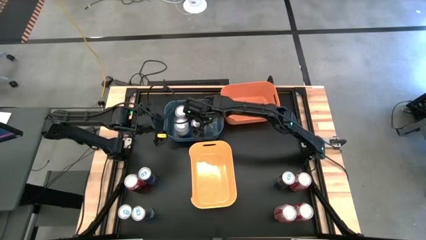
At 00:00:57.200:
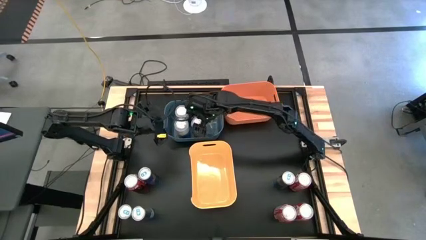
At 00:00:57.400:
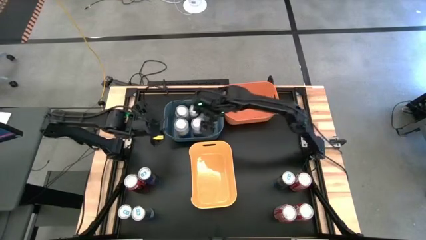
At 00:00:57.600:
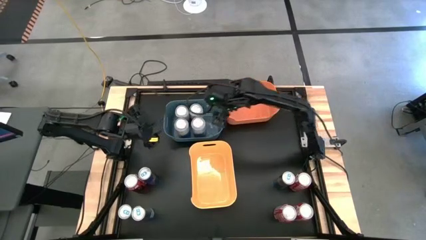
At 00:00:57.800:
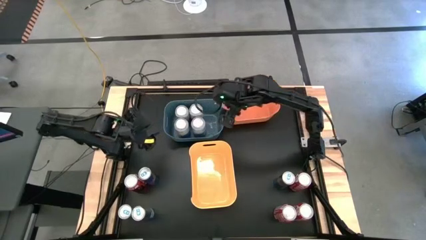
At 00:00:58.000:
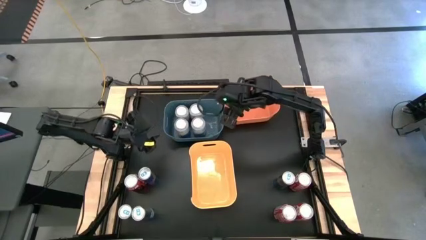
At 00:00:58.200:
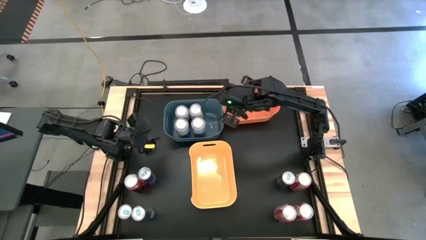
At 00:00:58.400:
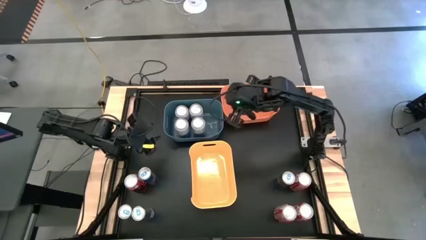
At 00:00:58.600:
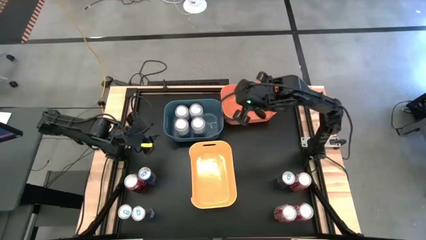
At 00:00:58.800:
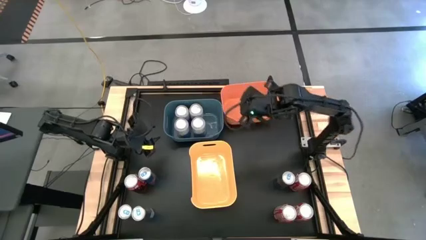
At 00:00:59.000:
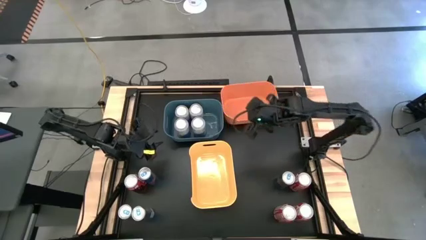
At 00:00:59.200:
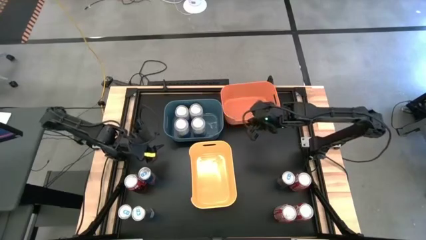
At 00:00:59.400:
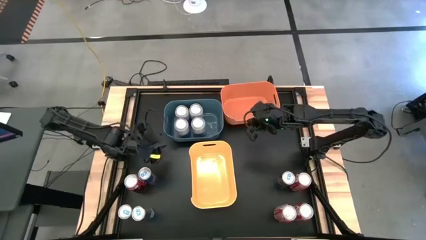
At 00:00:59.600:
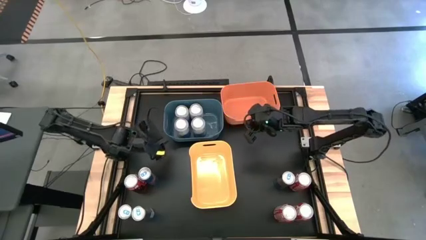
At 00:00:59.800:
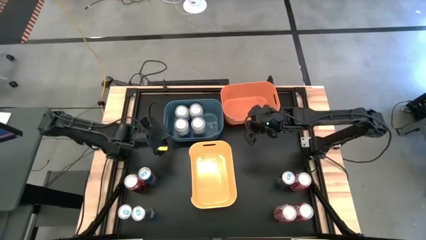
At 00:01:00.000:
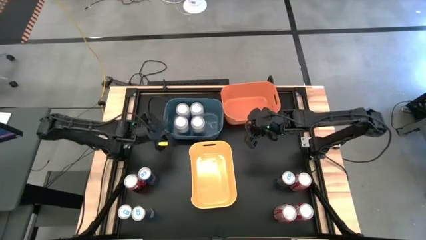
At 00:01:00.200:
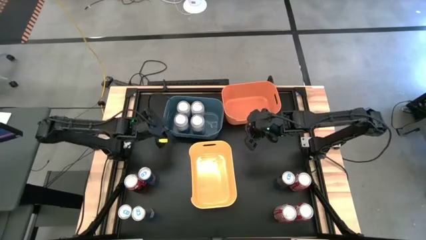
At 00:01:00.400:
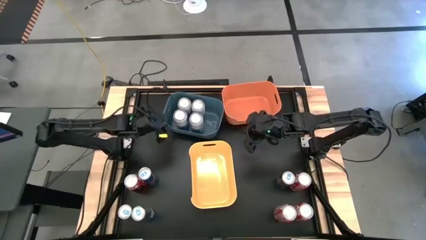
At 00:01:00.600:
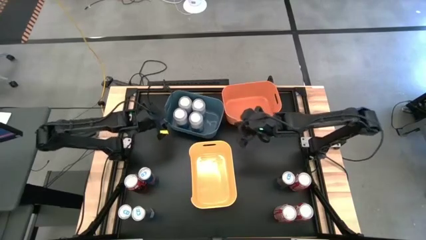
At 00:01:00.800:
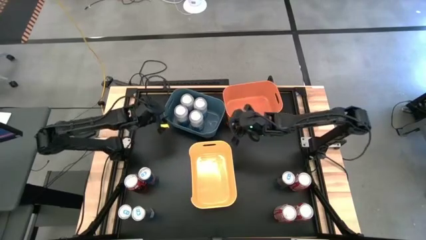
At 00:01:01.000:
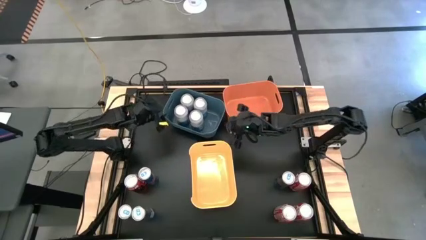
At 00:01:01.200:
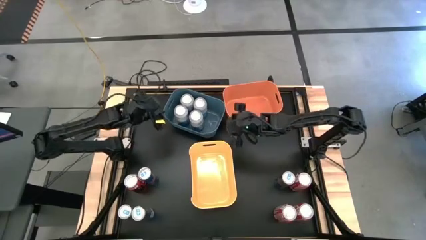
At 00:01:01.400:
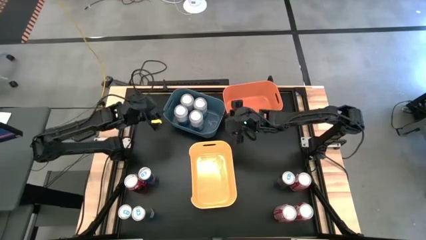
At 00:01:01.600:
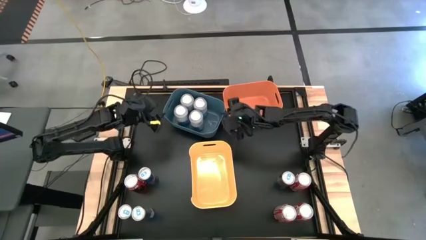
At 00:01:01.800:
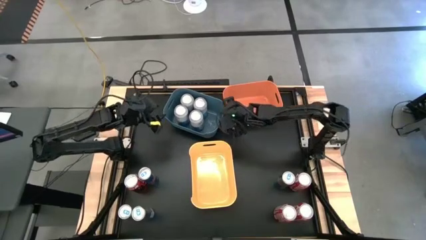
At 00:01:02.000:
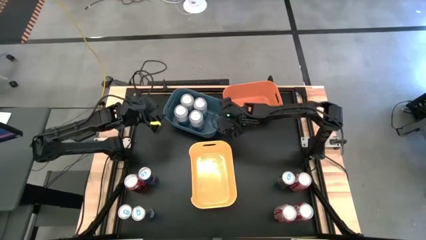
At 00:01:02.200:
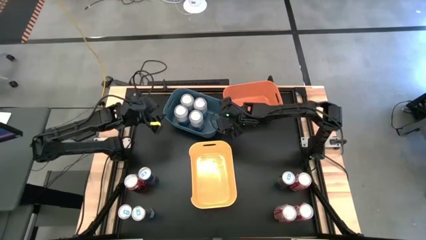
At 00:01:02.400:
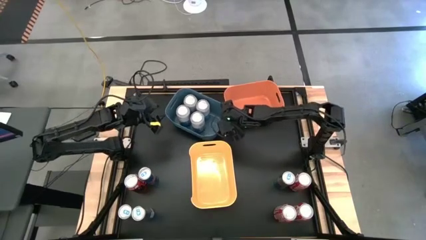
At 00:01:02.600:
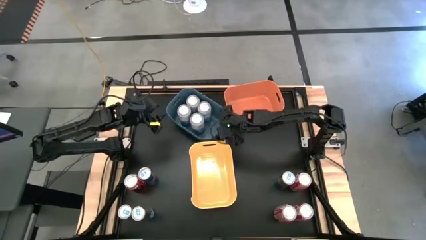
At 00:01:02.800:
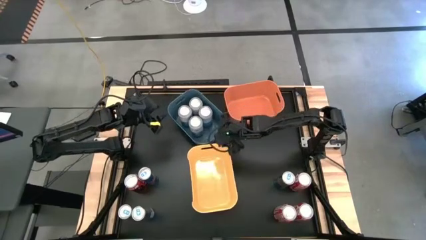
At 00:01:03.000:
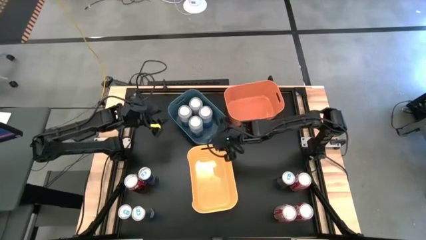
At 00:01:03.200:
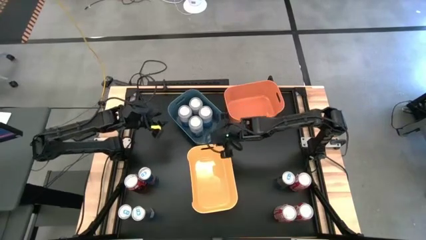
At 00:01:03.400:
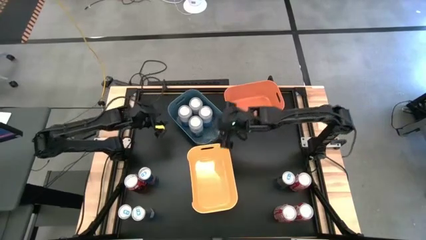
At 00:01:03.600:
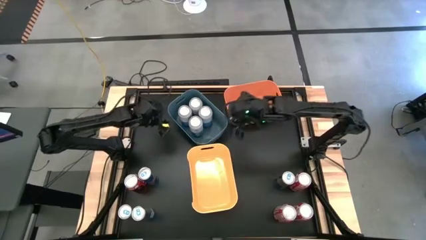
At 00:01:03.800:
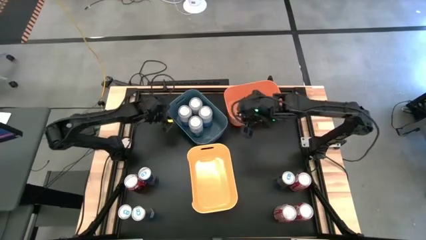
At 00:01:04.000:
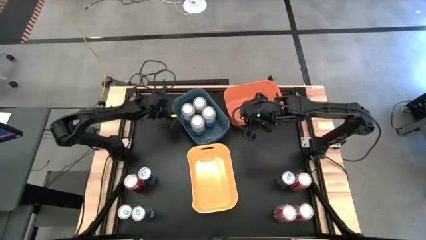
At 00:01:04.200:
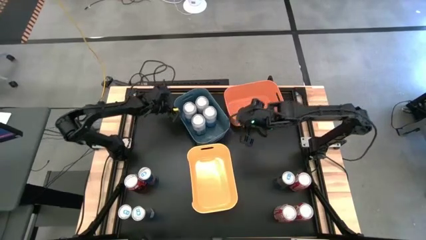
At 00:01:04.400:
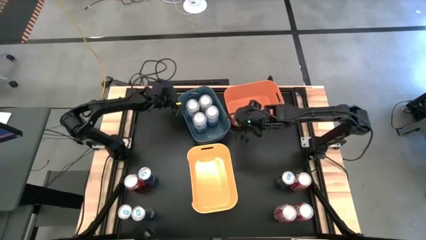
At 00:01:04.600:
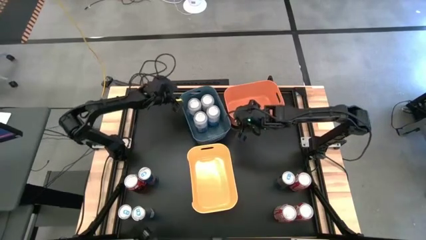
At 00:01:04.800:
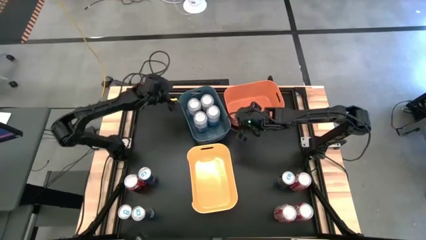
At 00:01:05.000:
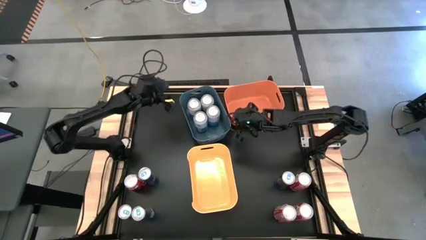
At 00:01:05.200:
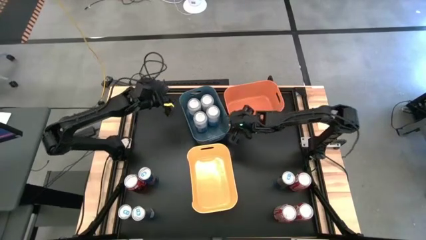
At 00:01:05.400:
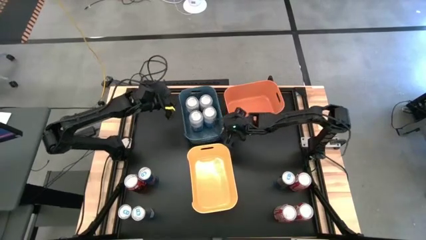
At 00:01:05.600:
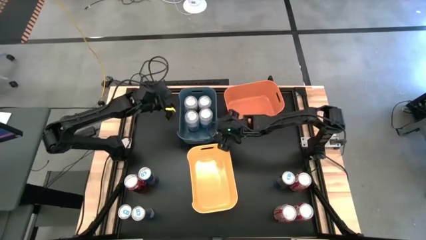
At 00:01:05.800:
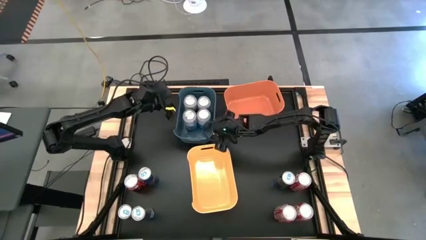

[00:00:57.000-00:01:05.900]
Task: Sort soda cans
Adjust the blue bin on the table

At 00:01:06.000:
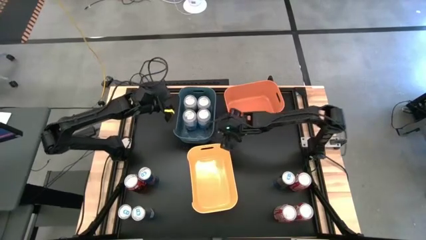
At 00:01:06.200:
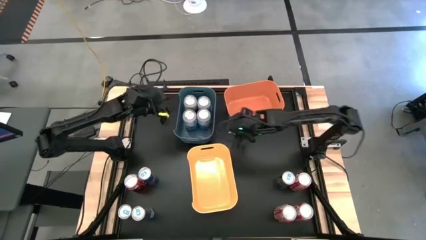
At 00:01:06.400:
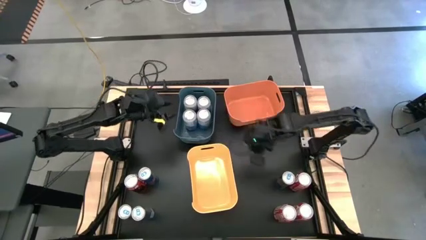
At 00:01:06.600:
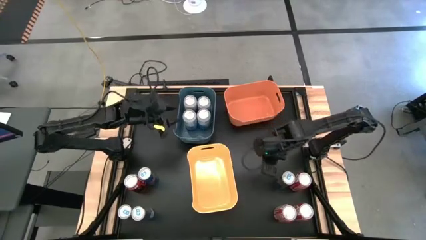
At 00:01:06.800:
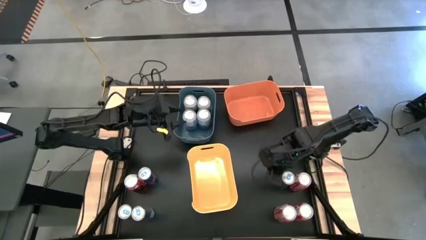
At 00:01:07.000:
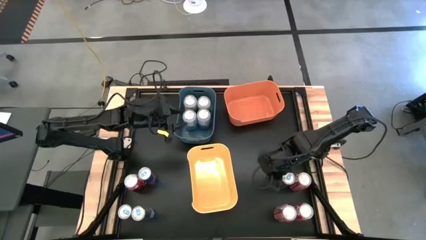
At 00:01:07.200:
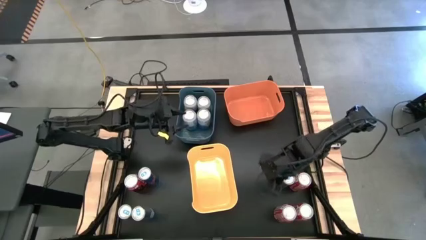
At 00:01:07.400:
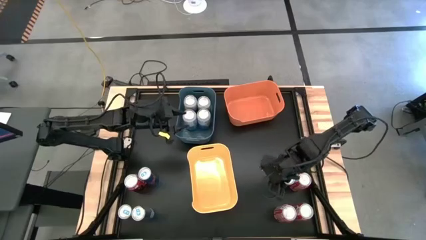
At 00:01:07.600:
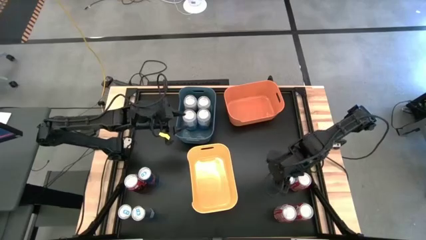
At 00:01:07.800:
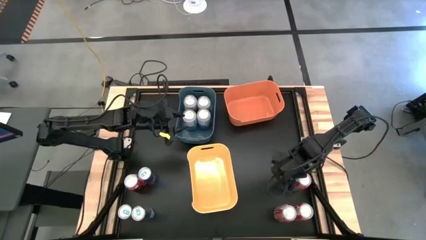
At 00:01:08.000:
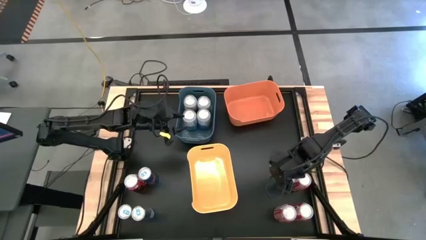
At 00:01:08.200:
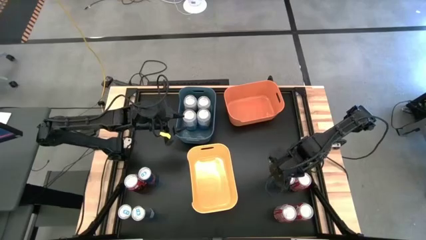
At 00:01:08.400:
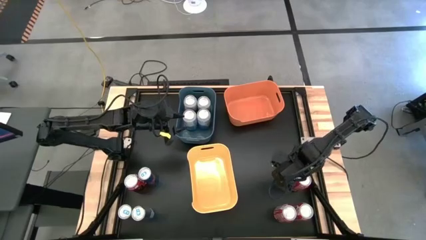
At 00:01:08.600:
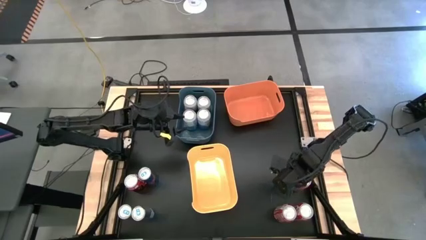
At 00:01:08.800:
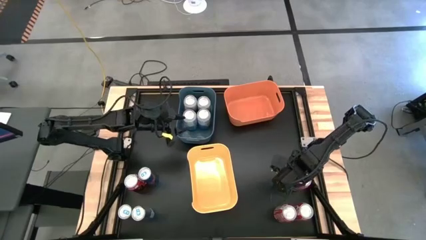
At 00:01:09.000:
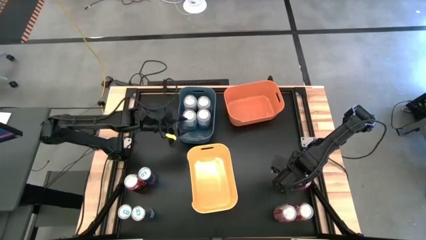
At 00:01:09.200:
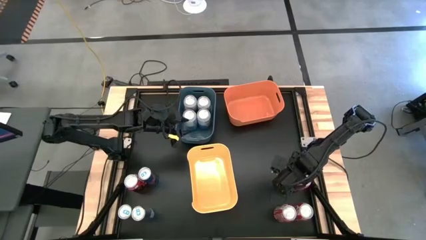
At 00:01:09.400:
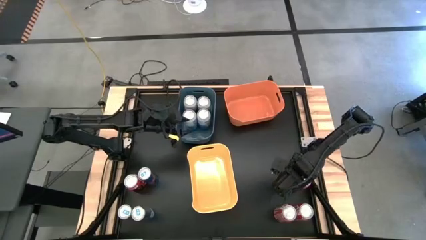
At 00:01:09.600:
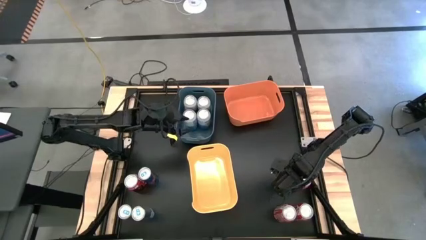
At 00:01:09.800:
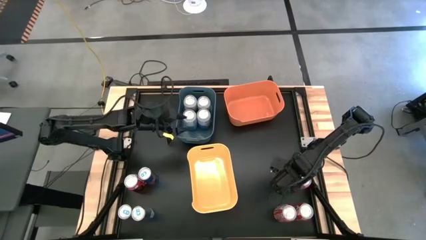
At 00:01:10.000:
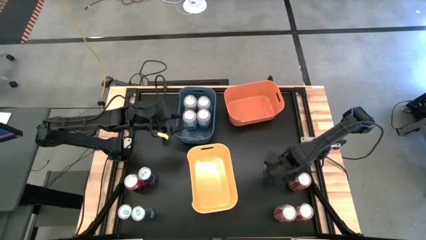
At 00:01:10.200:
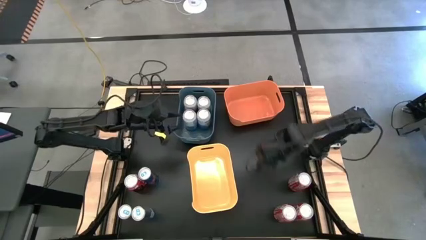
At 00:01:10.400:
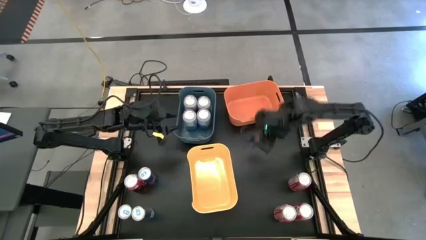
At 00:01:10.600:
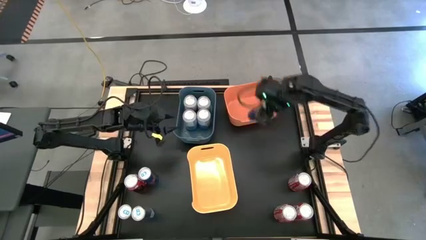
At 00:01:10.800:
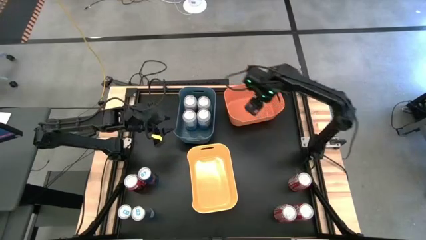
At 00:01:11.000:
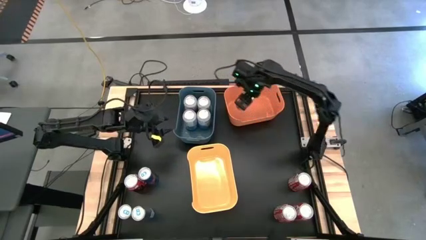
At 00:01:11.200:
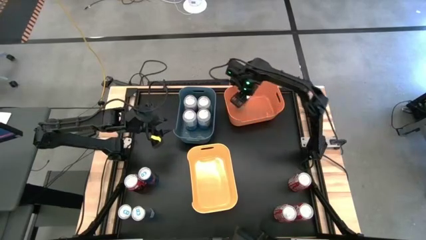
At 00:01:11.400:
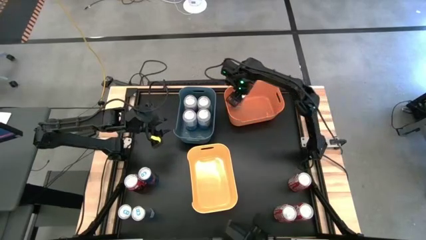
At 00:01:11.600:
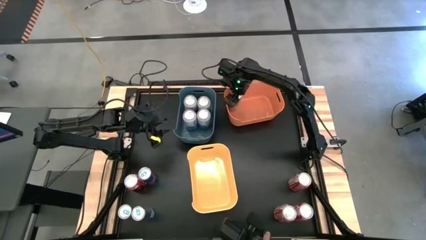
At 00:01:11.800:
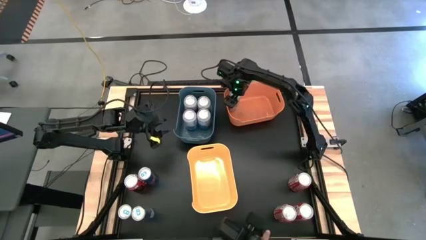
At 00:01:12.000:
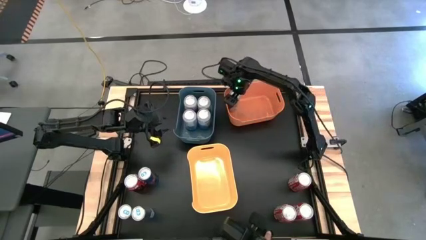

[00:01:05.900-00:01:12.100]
Put the top right blue soda can into the orange bin
